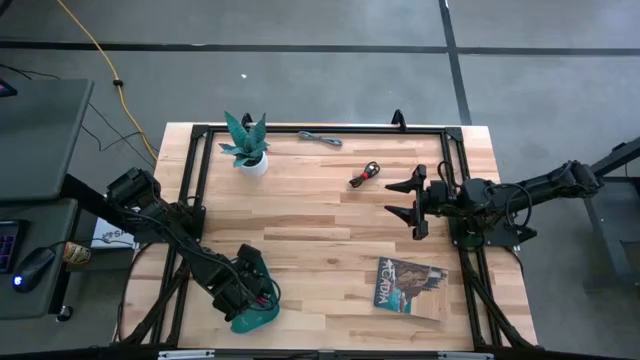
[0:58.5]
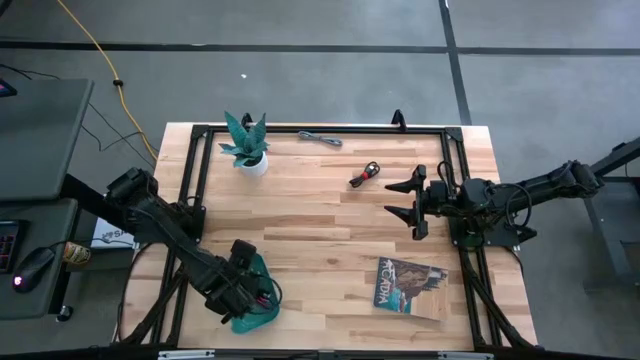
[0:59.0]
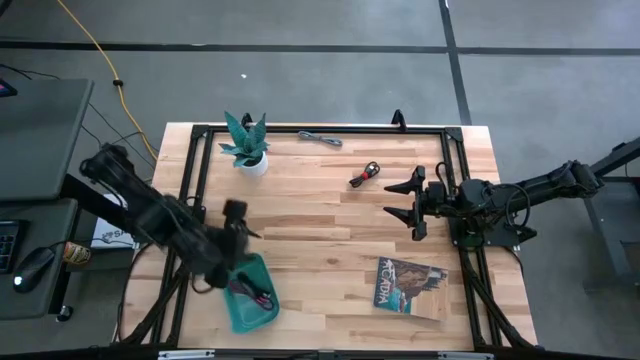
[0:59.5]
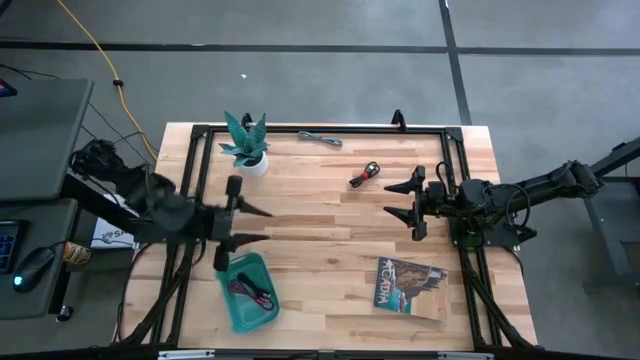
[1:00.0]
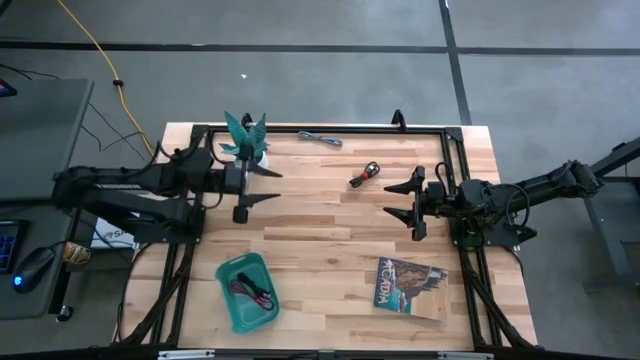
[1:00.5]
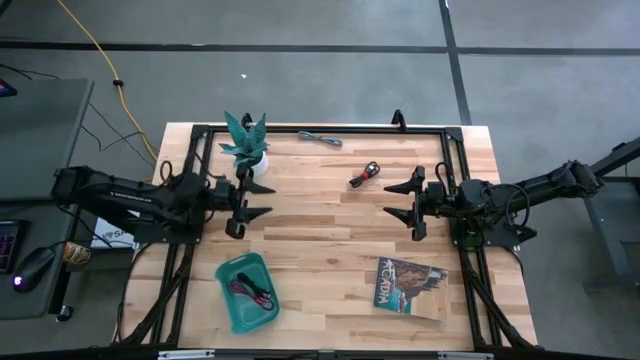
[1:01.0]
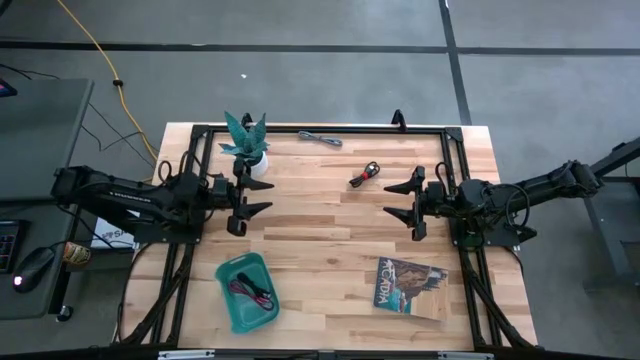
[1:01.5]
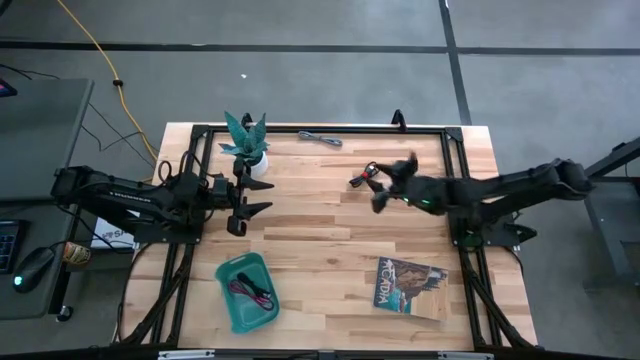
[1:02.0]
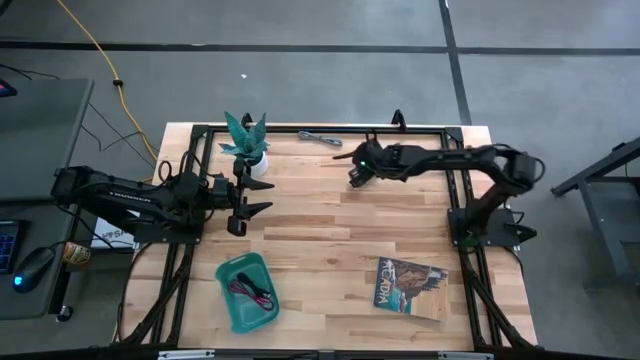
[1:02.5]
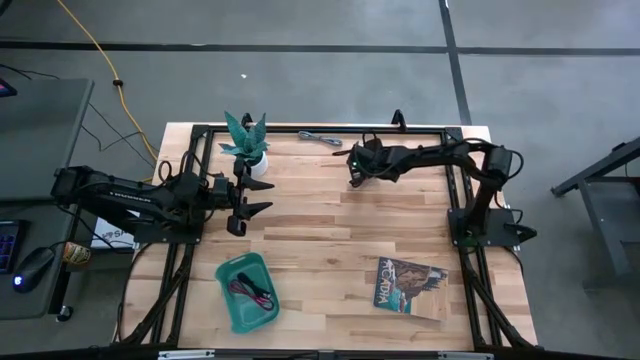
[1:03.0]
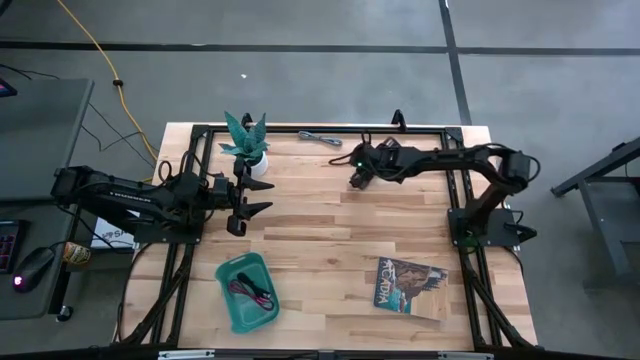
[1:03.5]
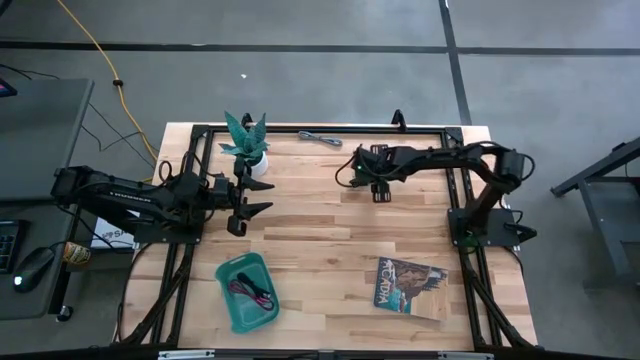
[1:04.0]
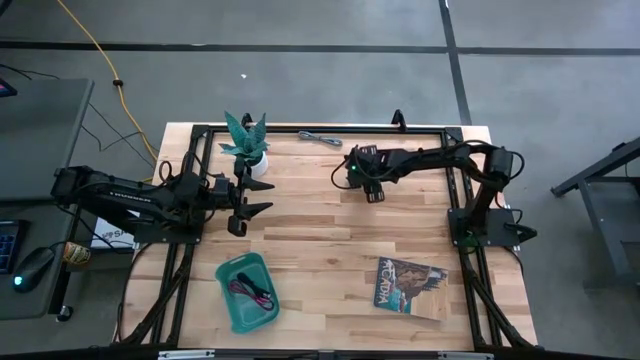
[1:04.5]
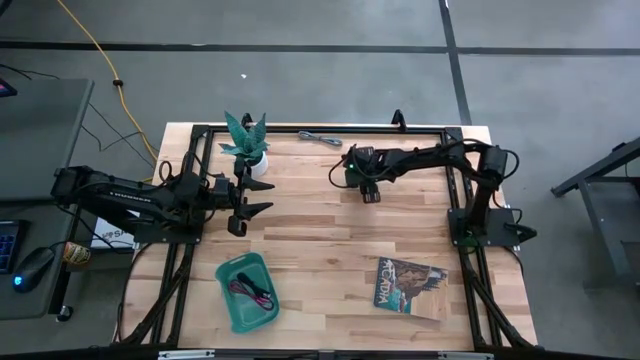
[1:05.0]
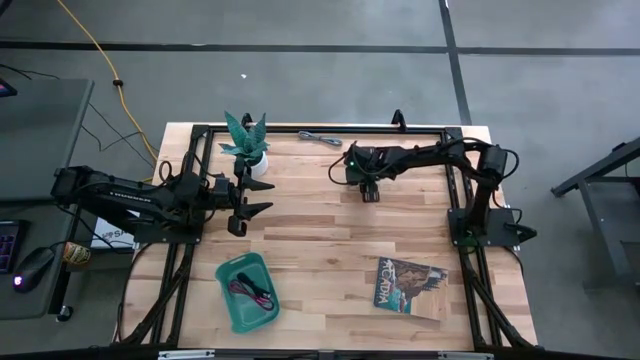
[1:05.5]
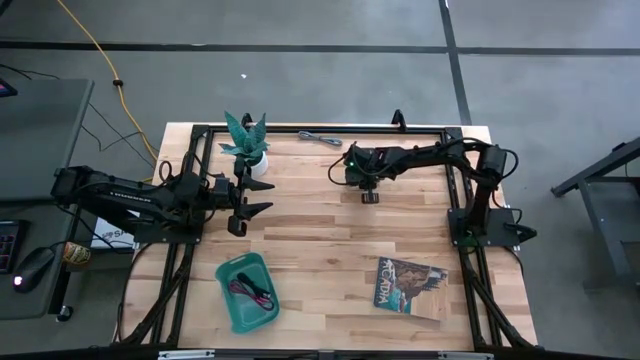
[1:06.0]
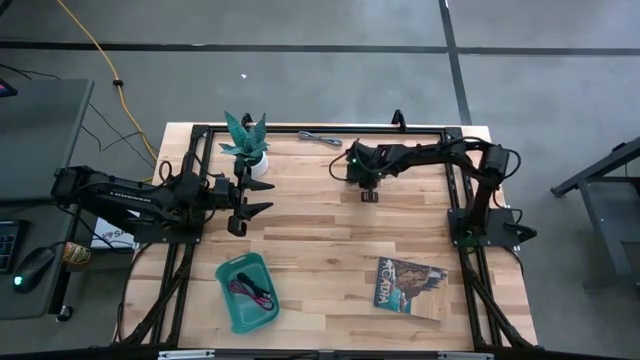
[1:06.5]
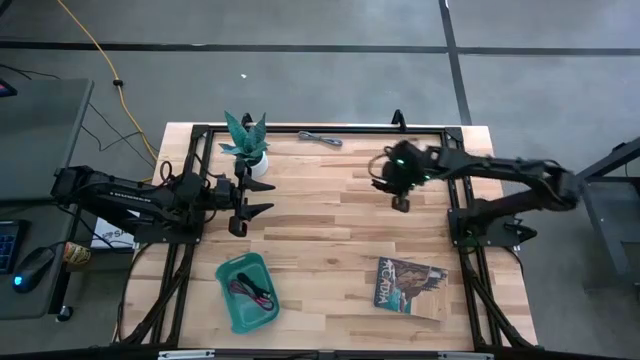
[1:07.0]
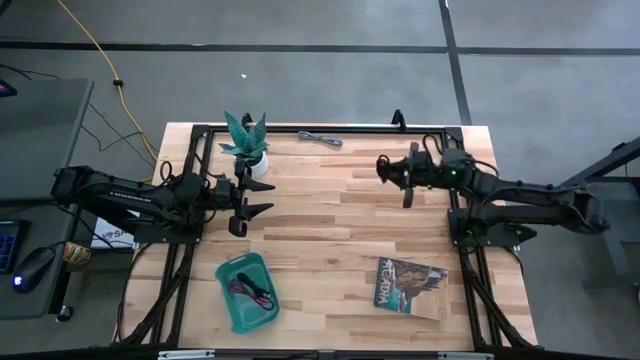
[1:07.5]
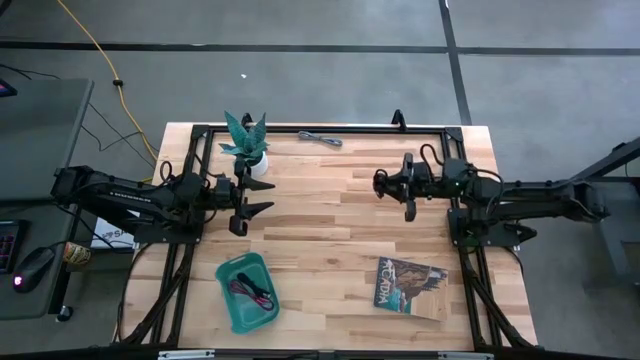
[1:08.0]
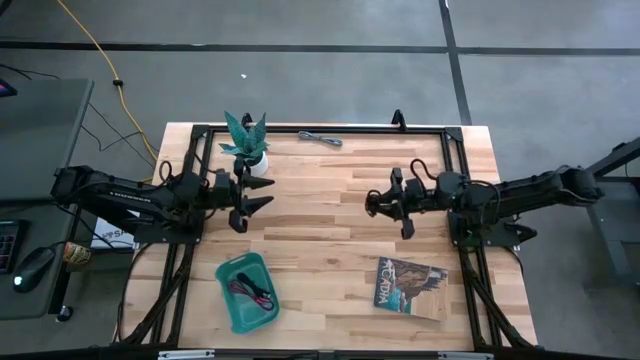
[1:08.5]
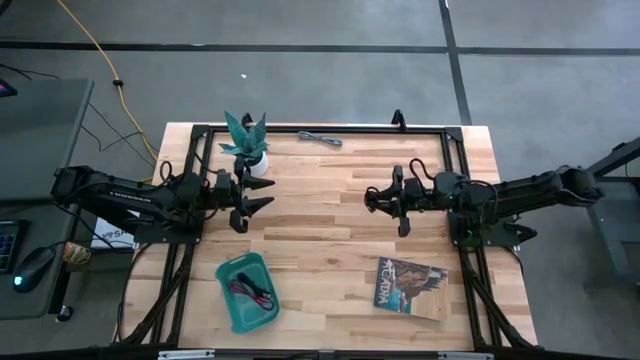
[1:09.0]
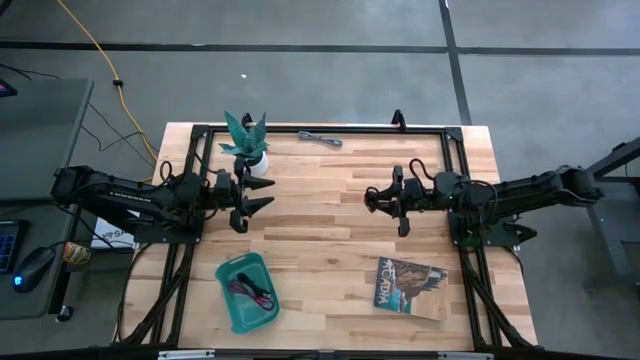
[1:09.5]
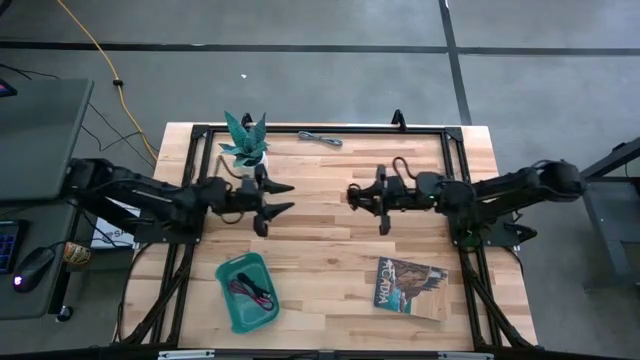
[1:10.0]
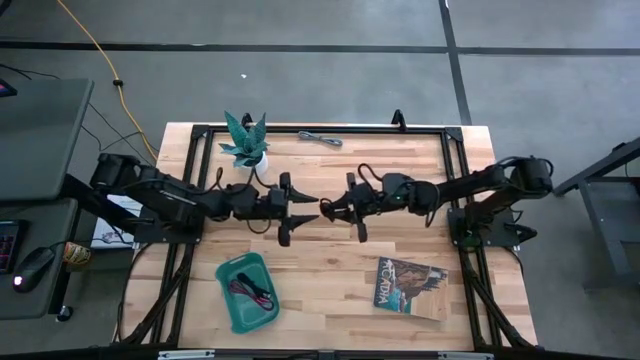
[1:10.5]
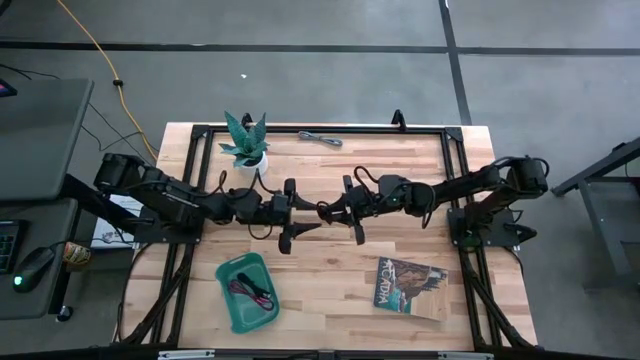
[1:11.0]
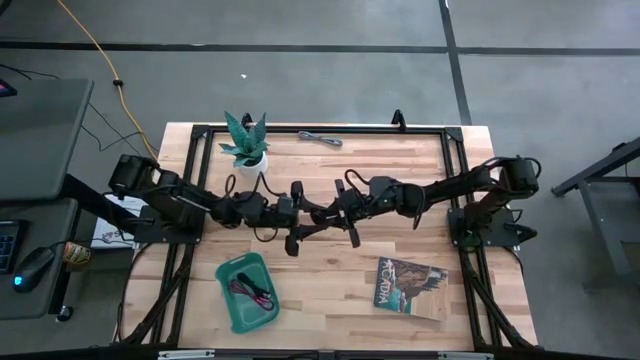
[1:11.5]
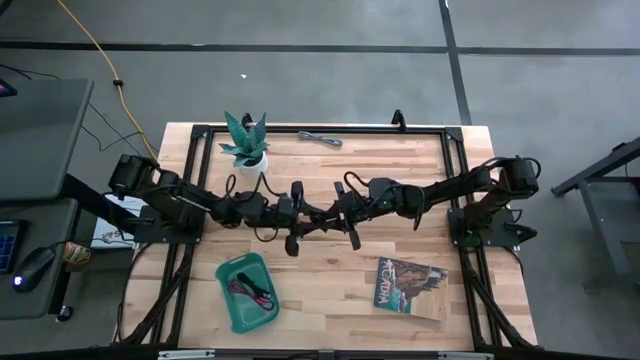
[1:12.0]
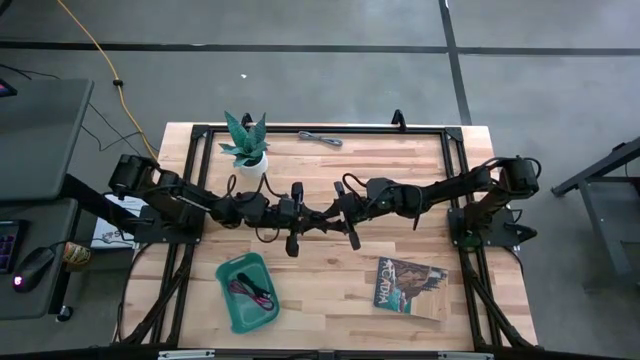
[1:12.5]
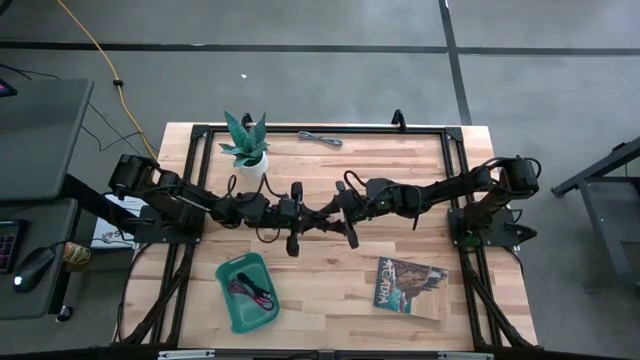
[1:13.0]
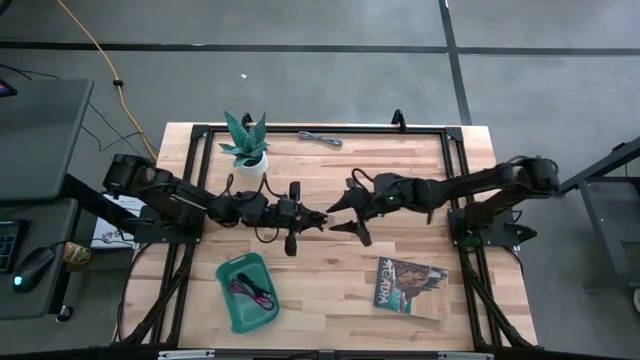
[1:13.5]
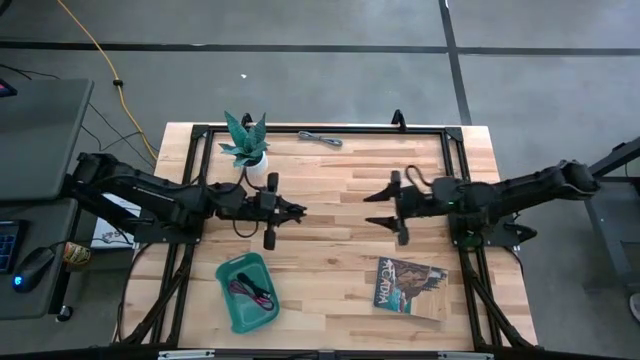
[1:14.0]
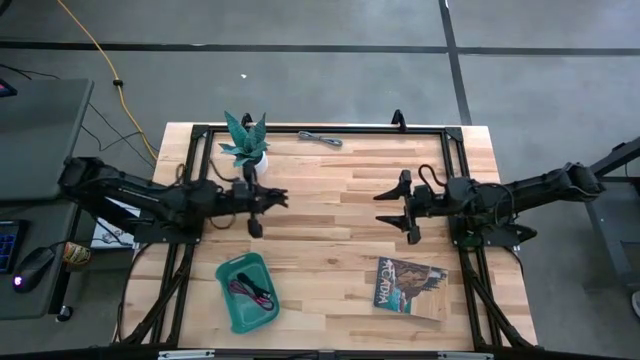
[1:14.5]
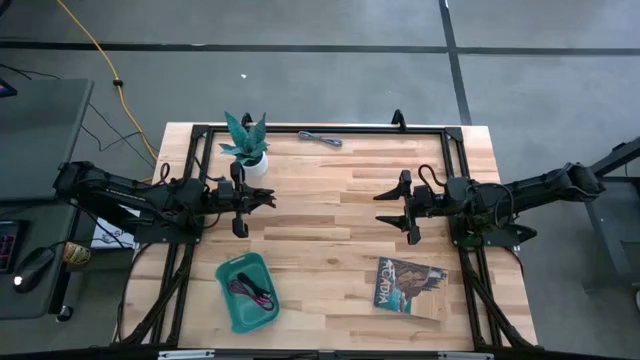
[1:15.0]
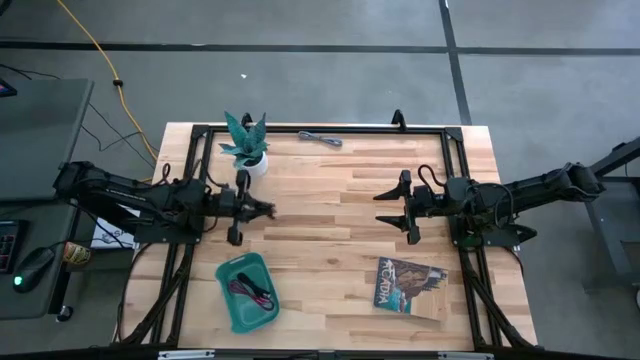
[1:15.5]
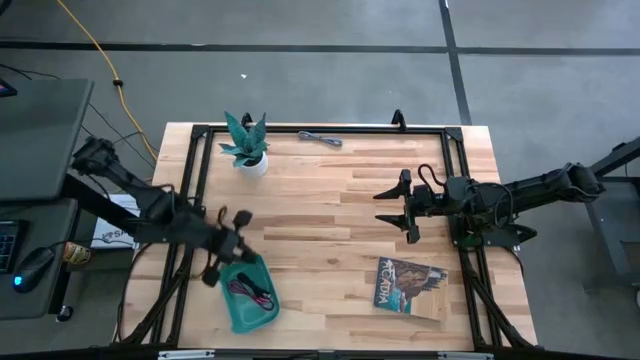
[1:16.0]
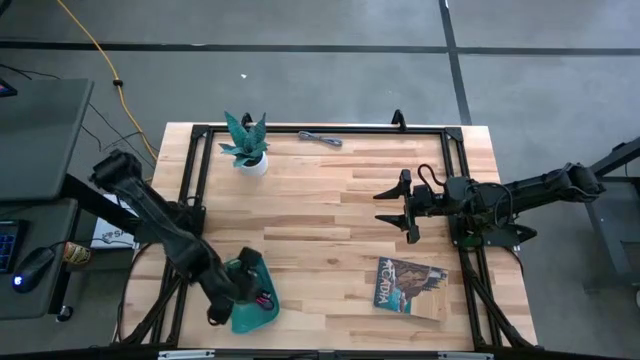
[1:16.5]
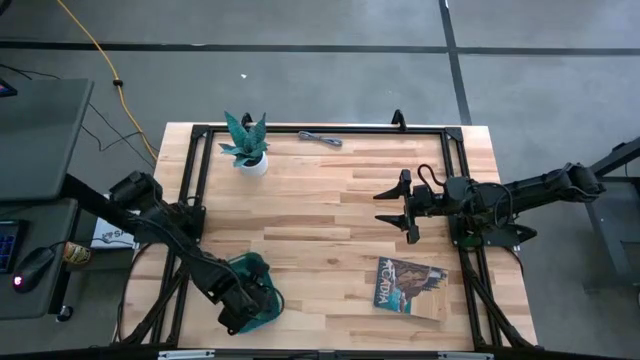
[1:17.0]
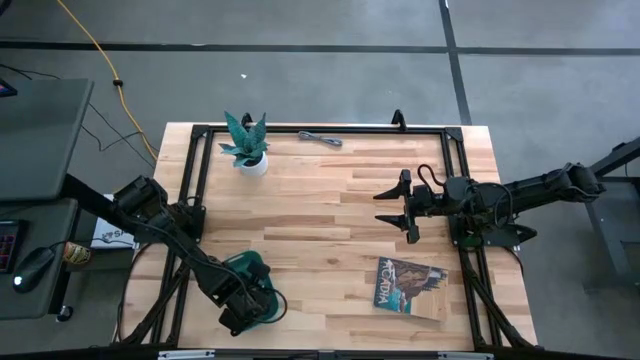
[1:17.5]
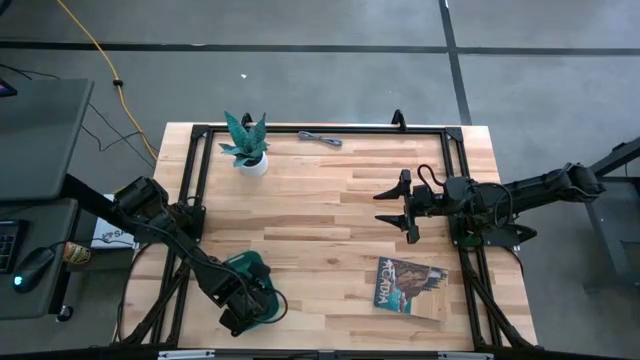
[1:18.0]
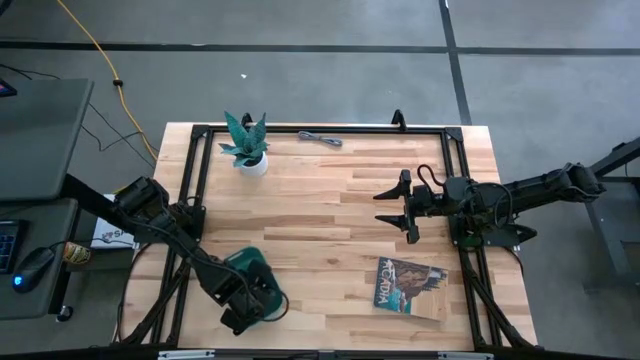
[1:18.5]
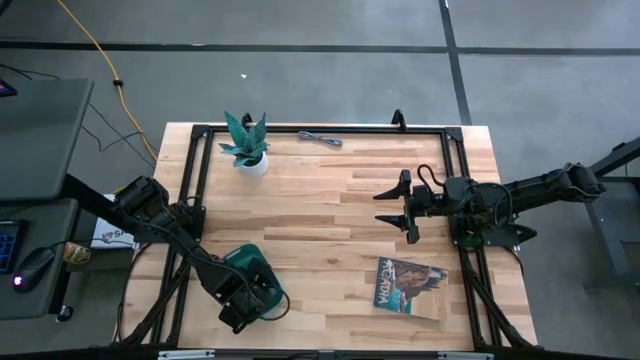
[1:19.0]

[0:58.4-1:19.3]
Task: Pick and place USB-C Cables
Put the black USB cable into the green bin

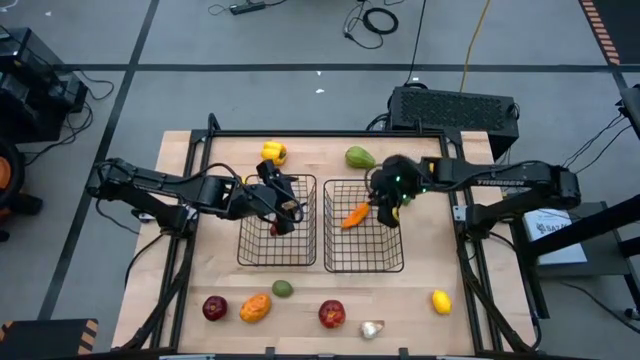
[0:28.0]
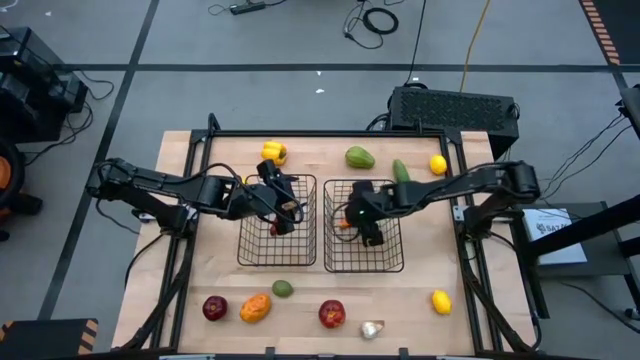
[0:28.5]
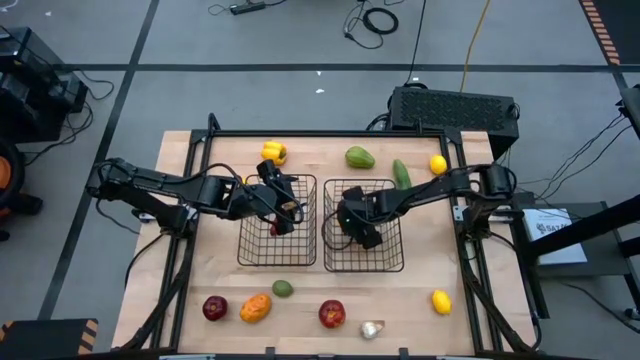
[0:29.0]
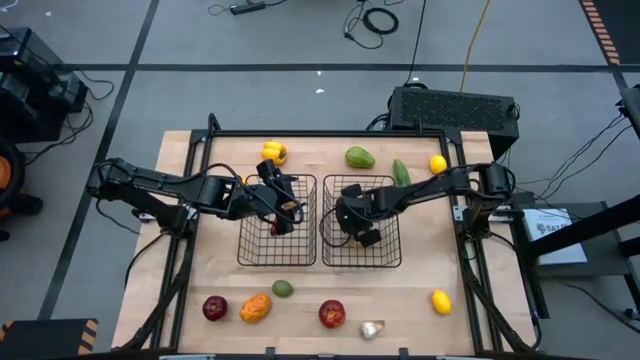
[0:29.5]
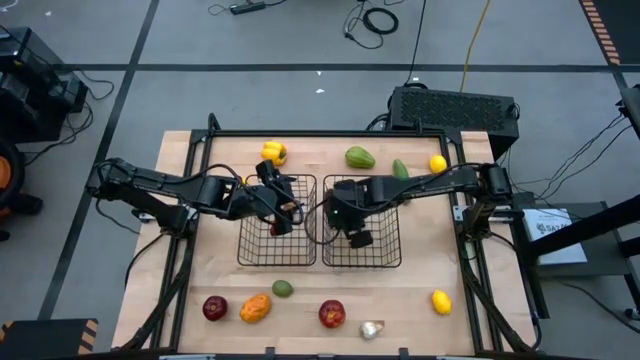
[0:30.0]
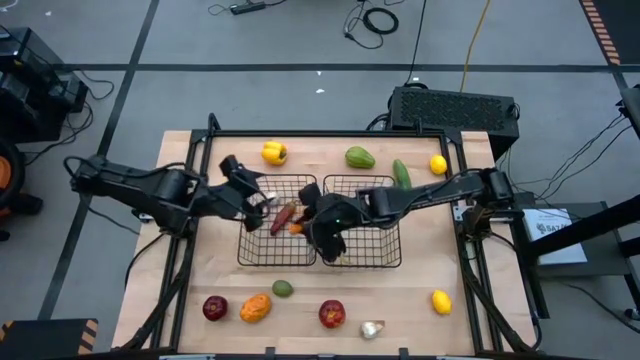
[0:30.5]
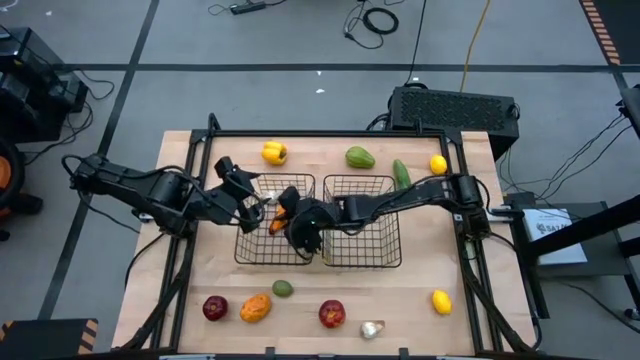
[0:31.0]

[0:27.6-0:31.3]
Task: Sort produce into baskets
Put the yellow chili pepper into the left black wire basket
